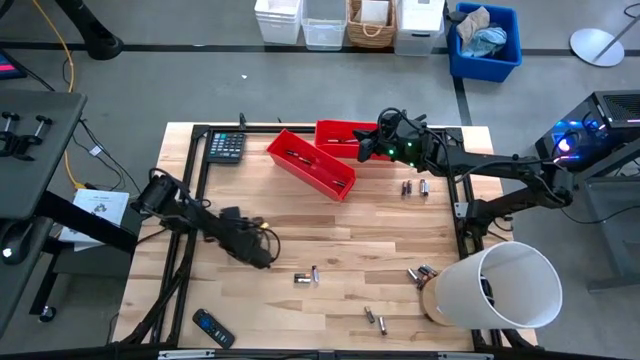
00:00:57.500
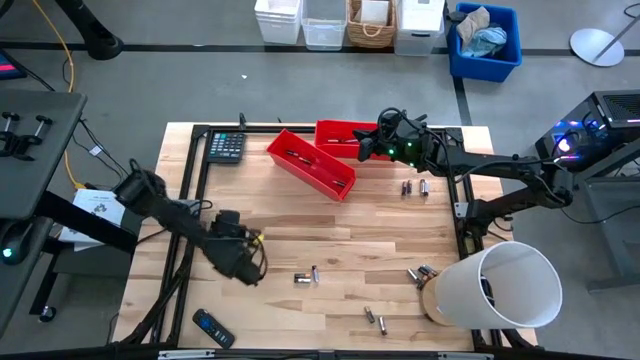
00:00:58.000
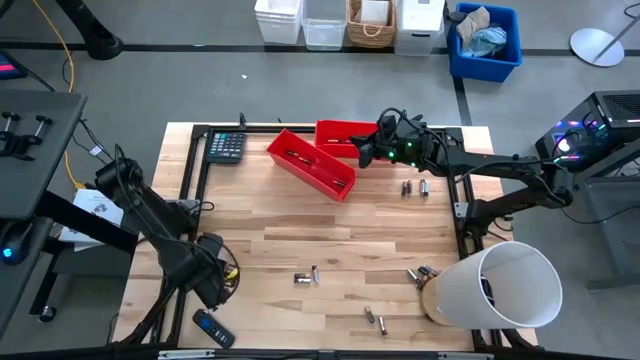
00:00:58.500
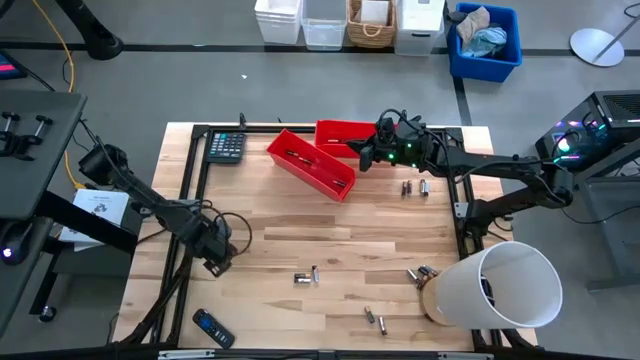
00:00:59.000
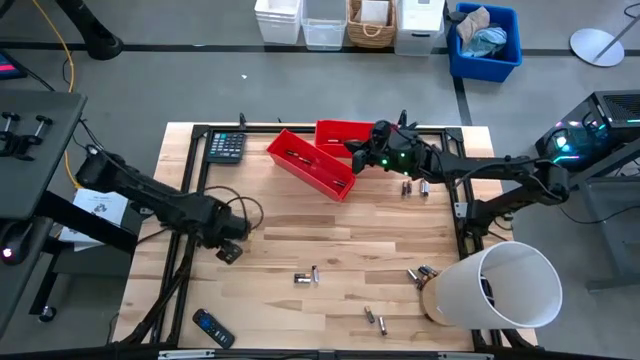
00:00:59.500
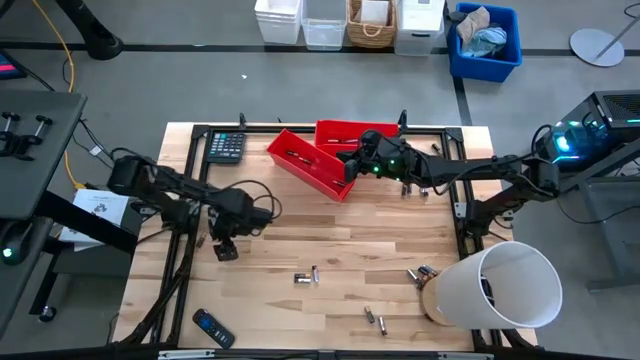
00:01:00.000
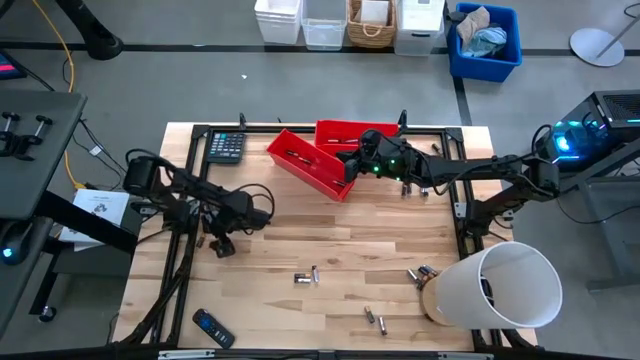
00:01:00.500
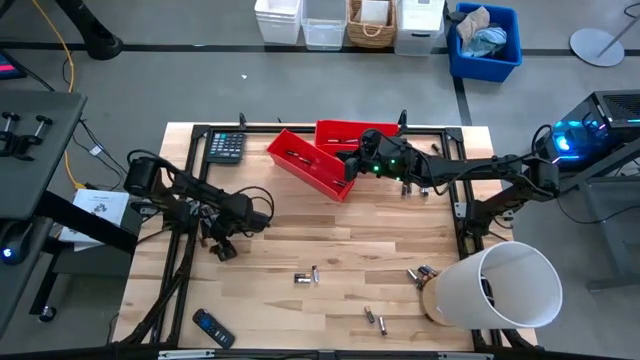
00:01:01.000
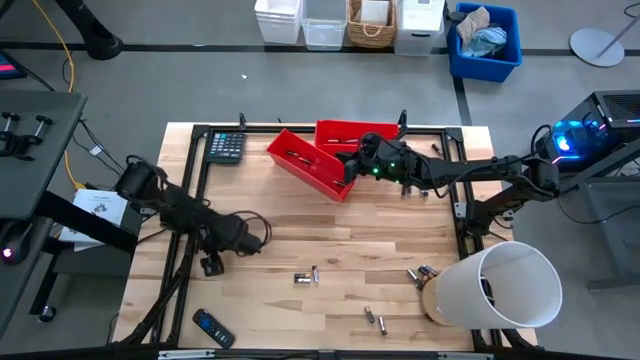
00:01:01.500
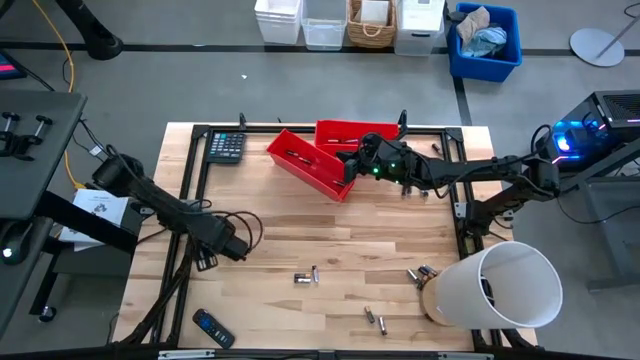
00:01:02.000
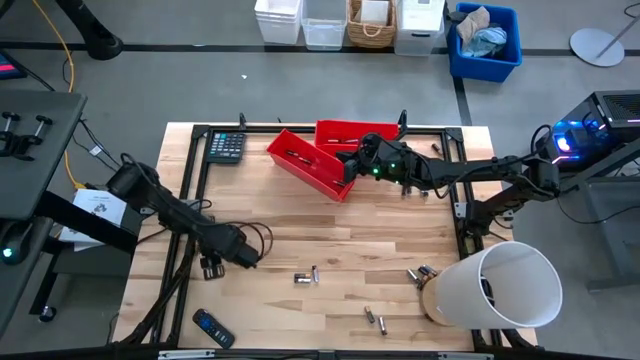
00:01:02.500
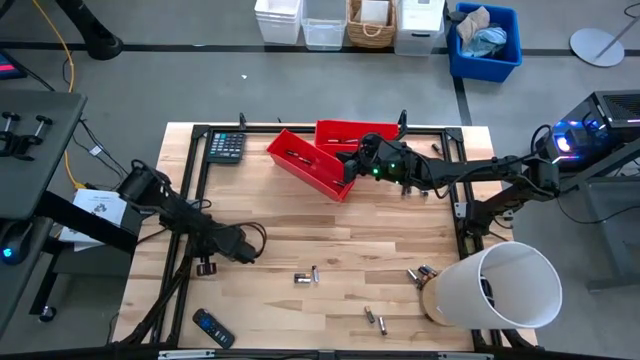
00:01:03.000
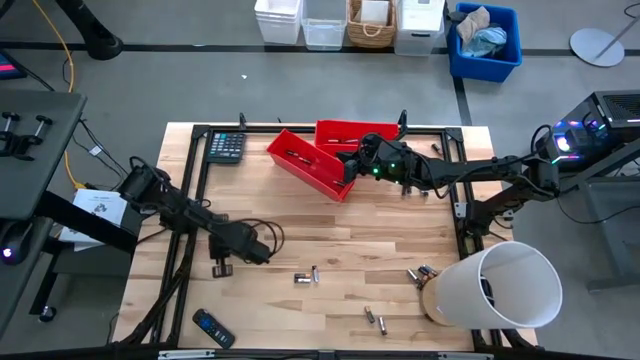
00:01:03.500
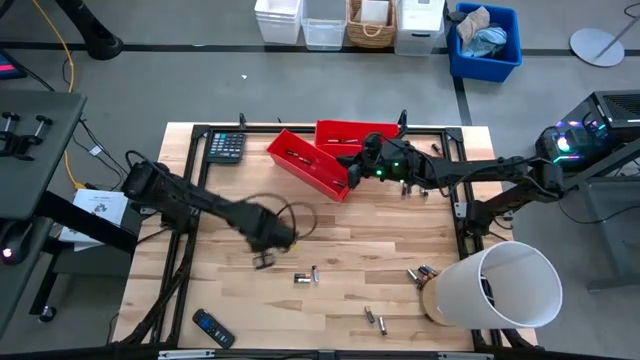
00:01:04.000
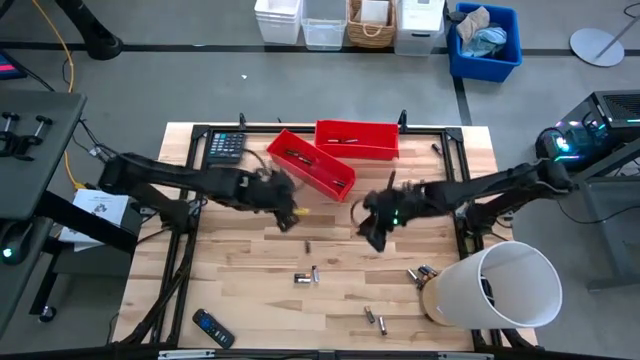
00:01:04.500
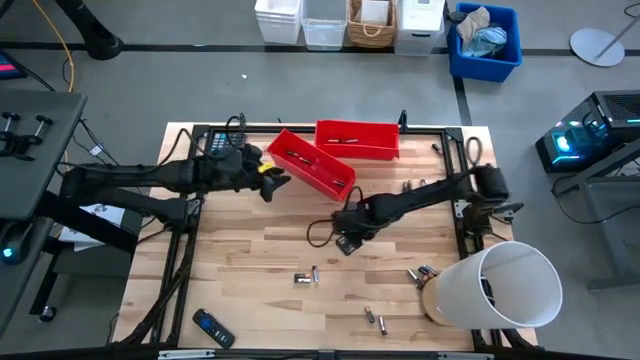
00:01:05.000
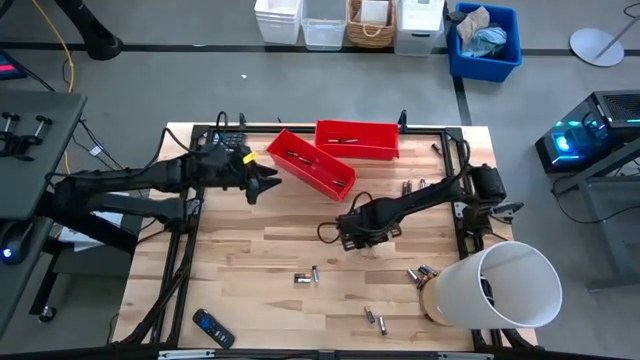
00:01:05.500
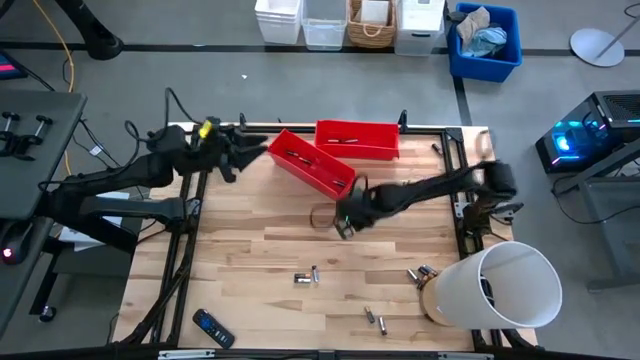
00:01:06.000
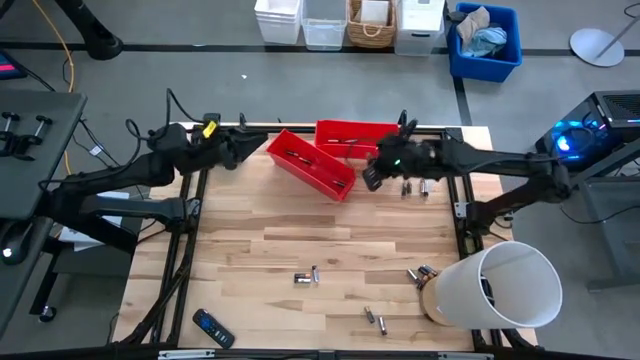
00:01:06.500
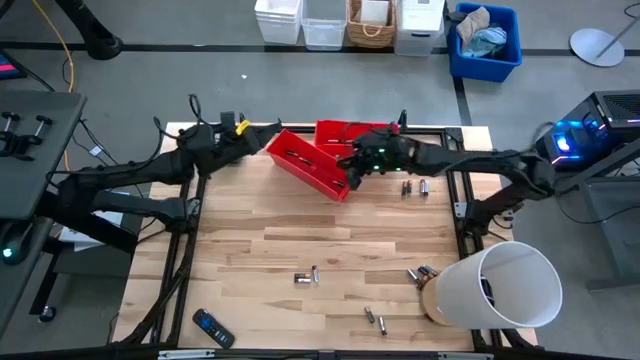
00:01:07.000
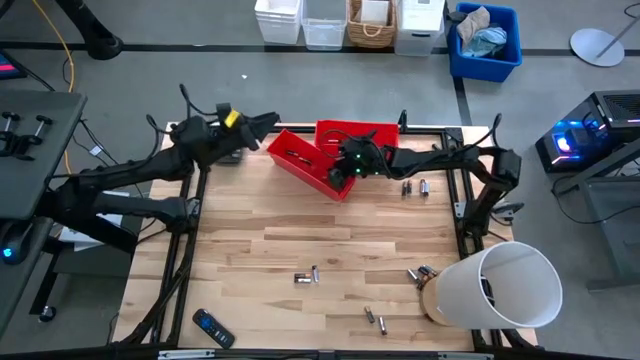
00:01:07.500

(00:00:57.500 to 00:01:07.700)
Task: Sort batteries
Put the black battery into the bottom red bin

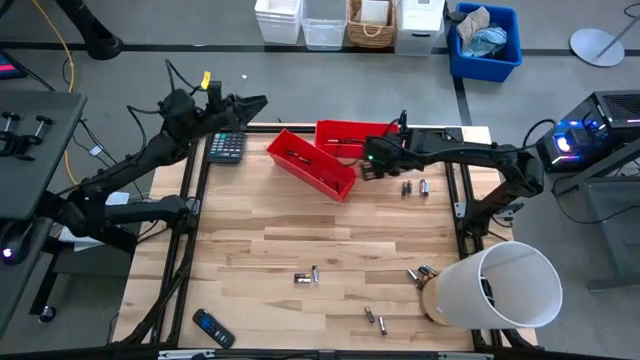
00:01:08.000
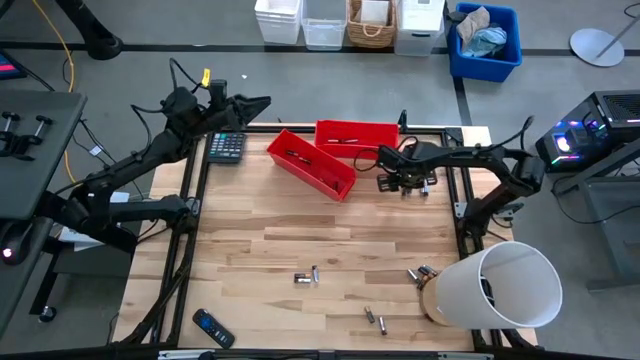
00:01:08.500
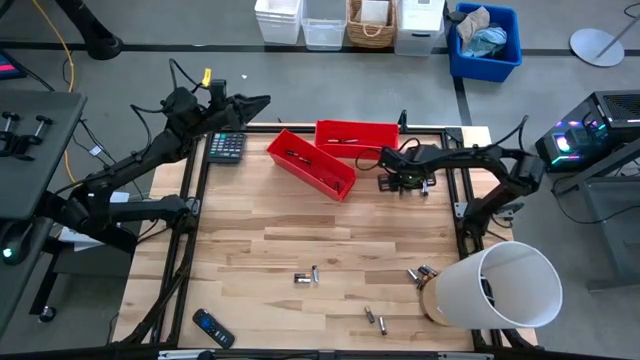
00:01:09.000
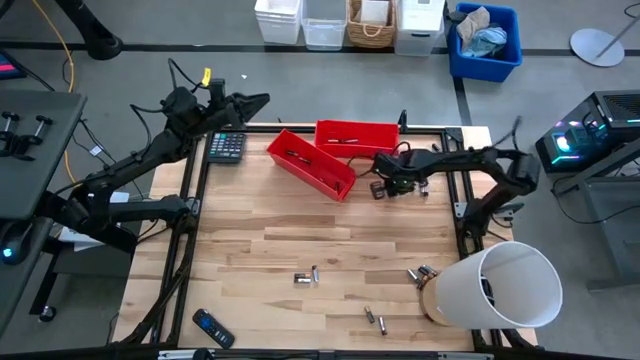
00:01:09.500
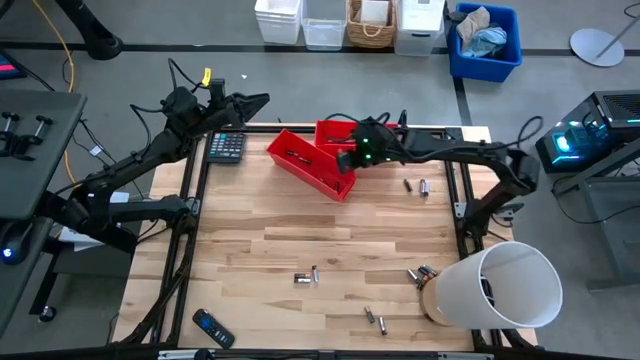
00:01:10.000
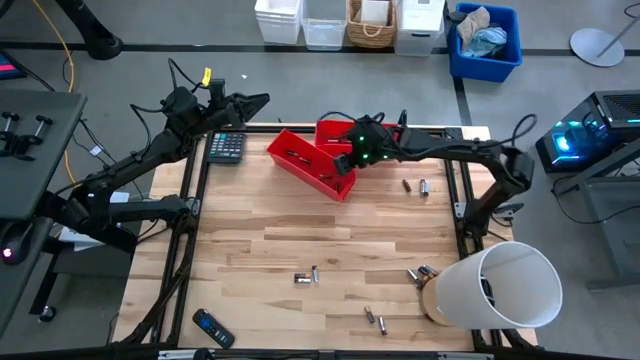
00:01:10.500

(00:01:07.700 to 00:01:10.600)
Put the black battery into the bottom red bin

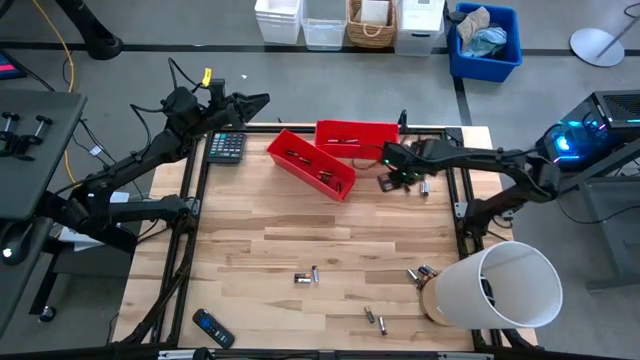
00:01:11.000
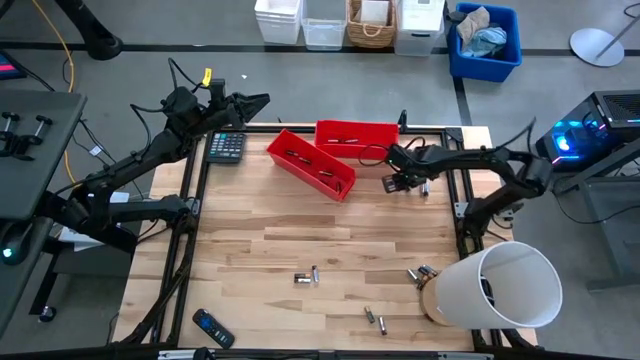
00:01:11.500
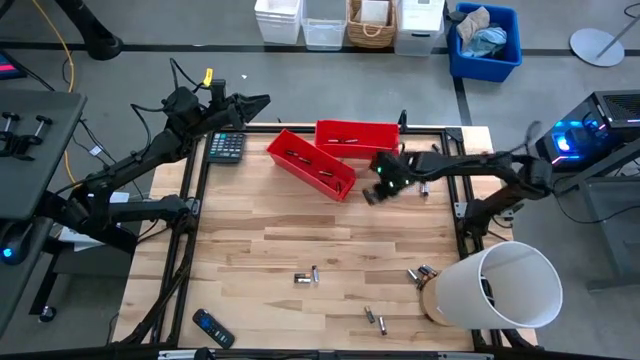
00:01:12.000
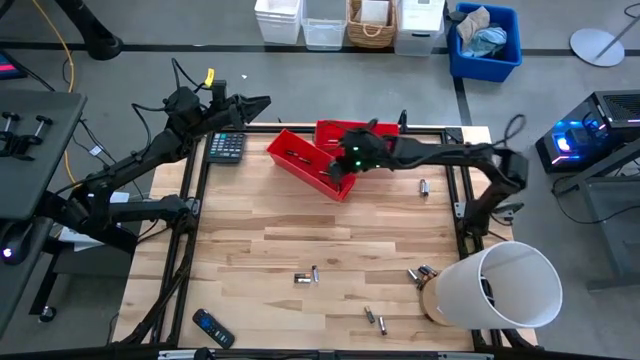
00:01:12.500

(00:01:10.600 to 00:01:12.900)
Put the black battery into the bottom red bin

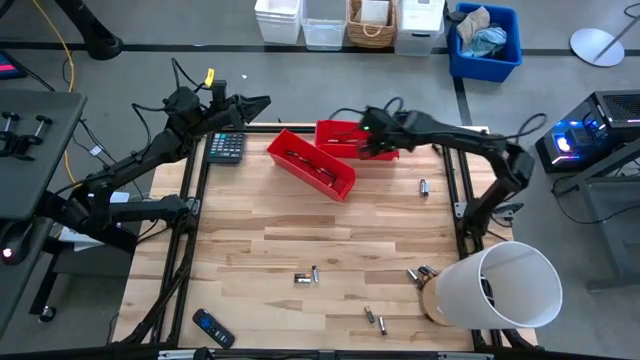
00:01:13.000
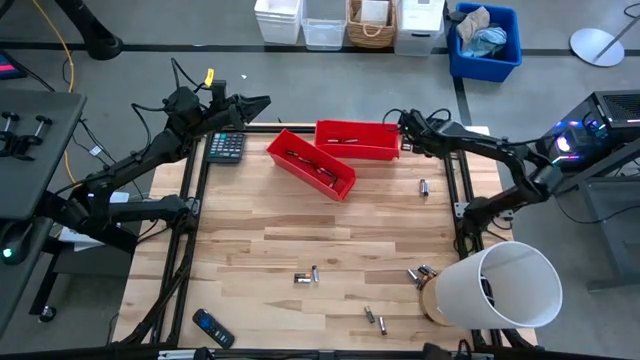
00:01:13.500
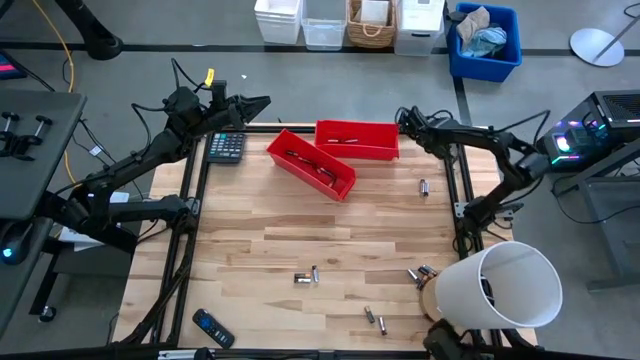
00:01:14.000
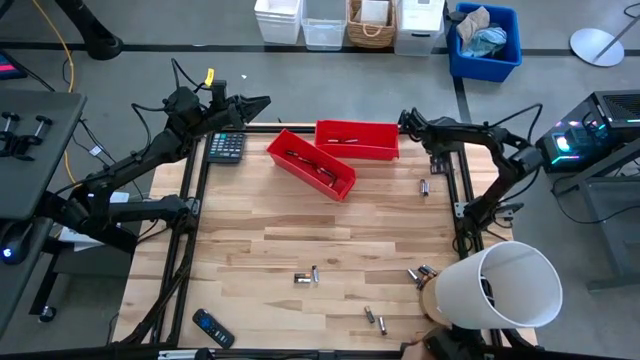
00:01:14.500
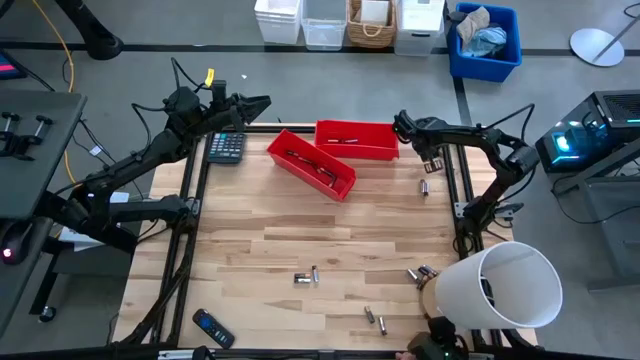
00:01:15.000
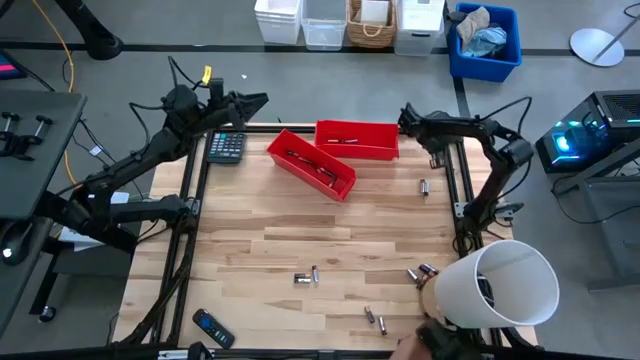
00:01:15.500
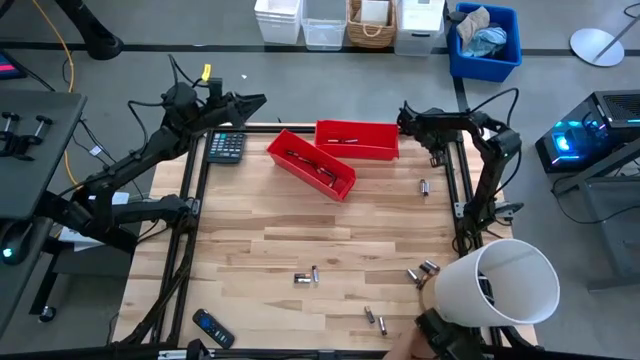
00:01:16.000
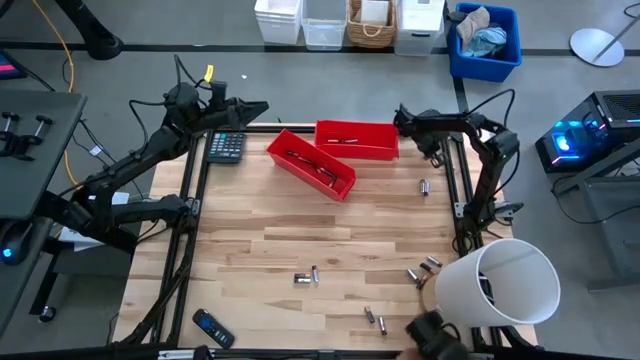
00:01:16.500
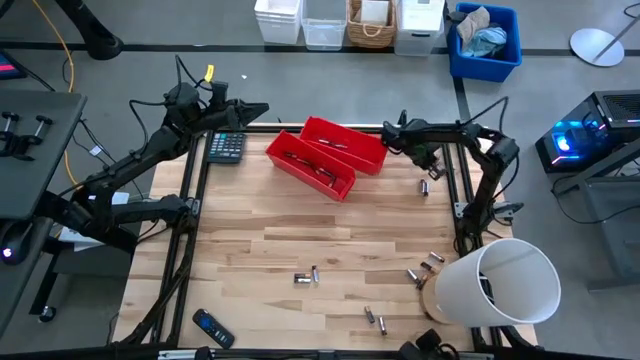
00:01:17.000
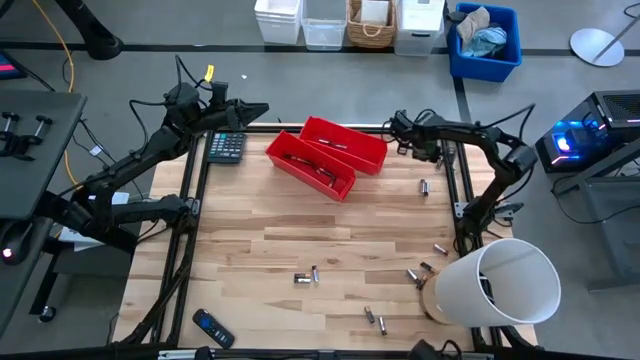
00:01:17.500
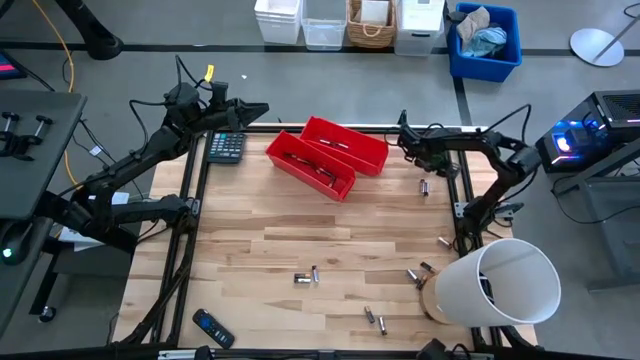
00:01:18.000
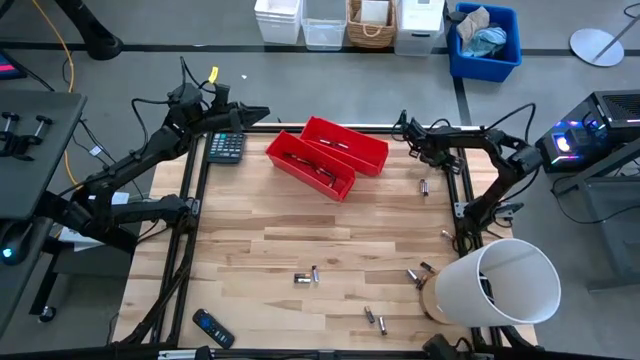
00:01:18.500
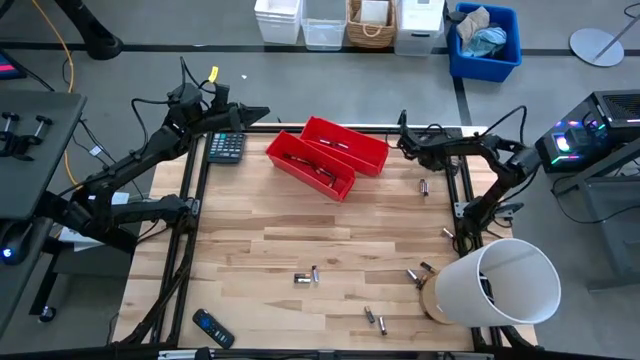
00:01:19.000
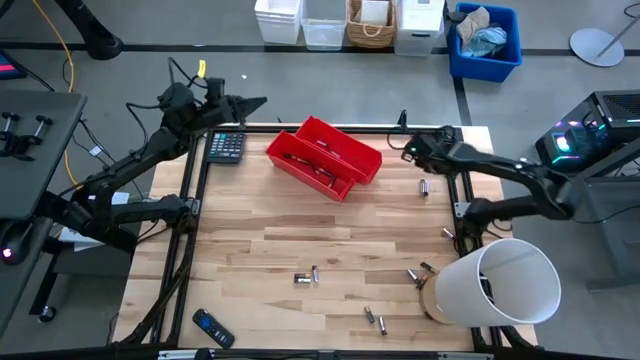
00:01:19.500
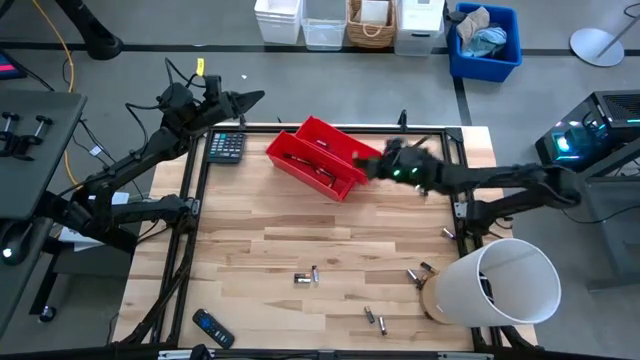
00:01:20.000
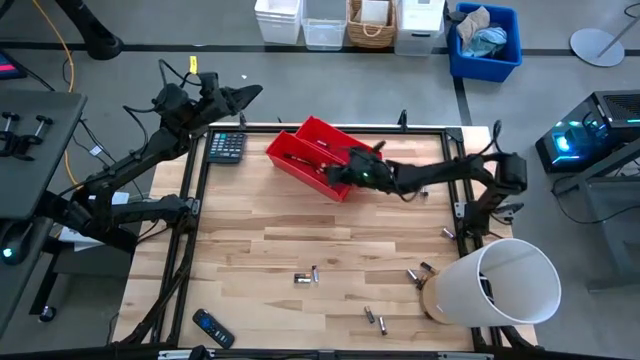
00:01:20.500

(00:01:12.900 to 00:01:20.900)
Put the black battery into the bottom red bin
